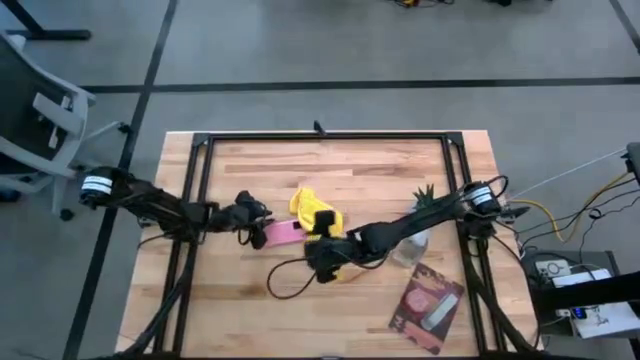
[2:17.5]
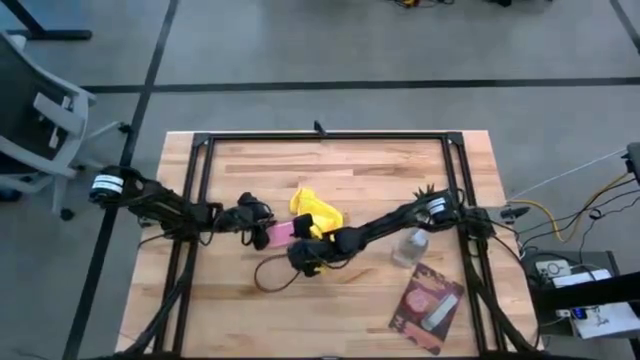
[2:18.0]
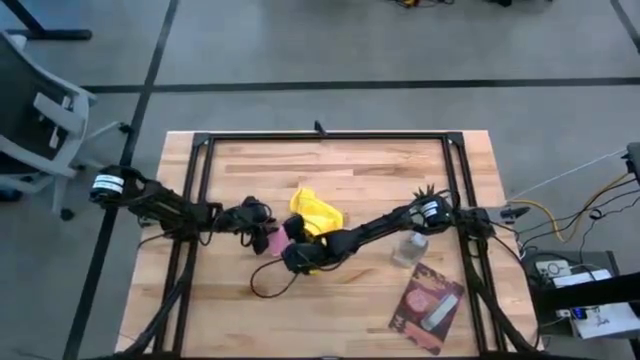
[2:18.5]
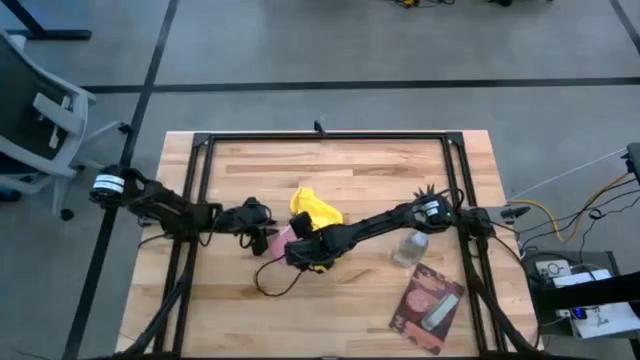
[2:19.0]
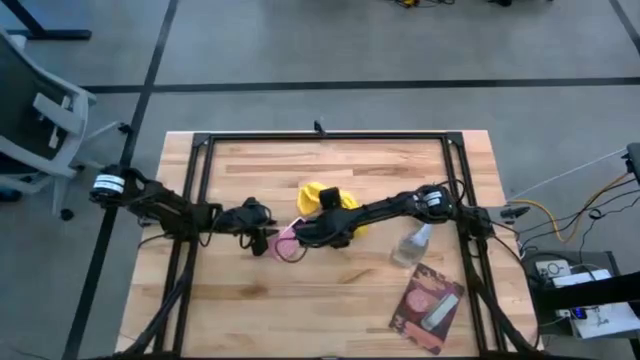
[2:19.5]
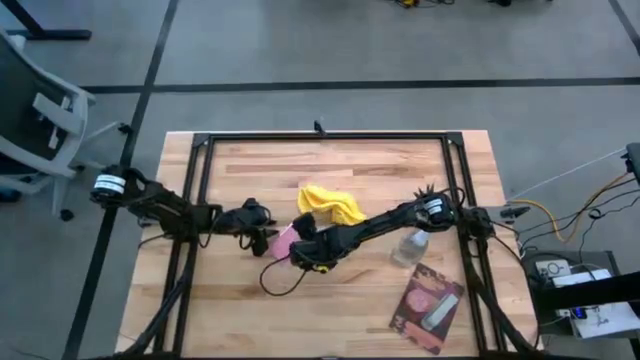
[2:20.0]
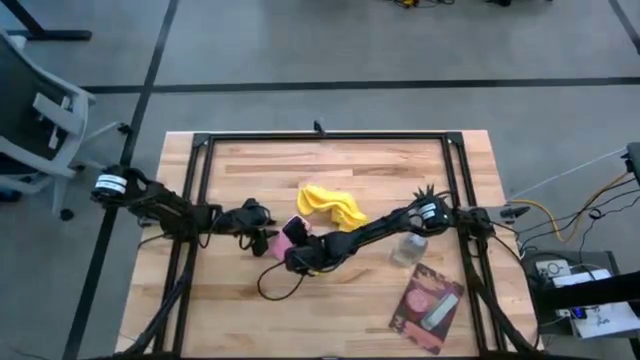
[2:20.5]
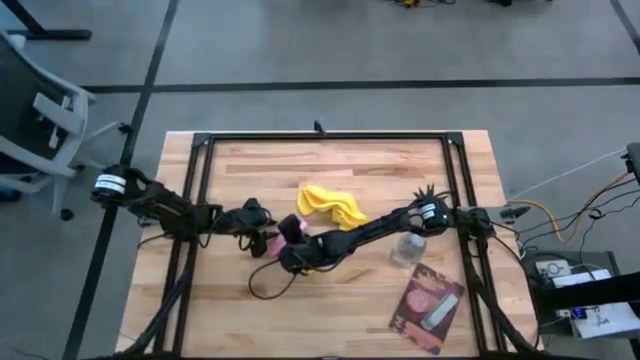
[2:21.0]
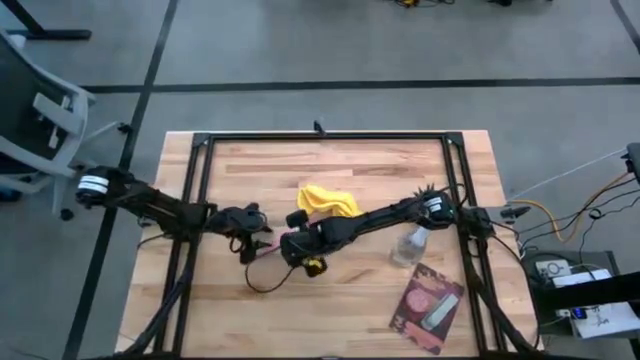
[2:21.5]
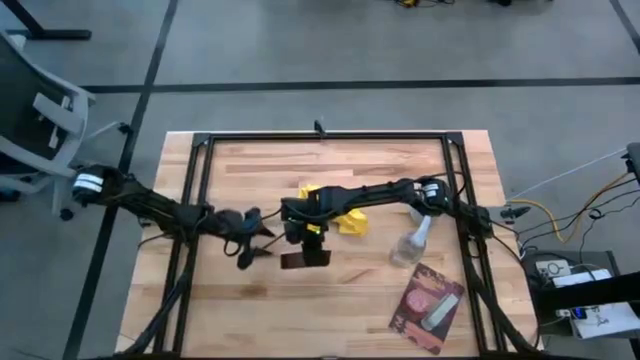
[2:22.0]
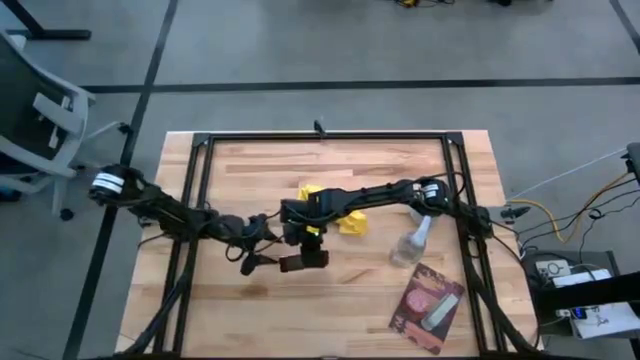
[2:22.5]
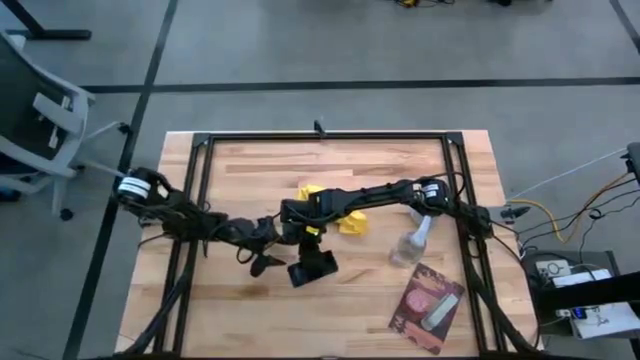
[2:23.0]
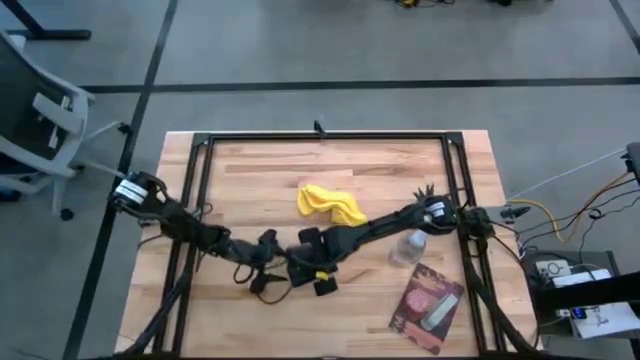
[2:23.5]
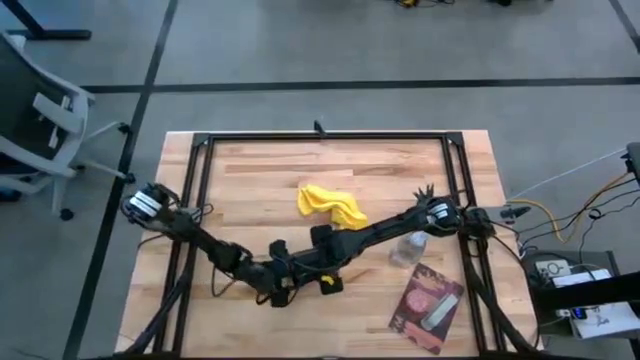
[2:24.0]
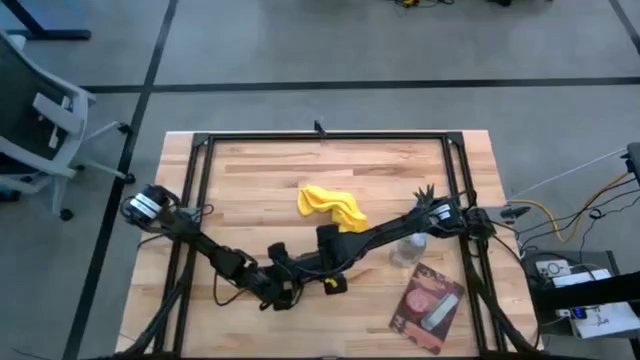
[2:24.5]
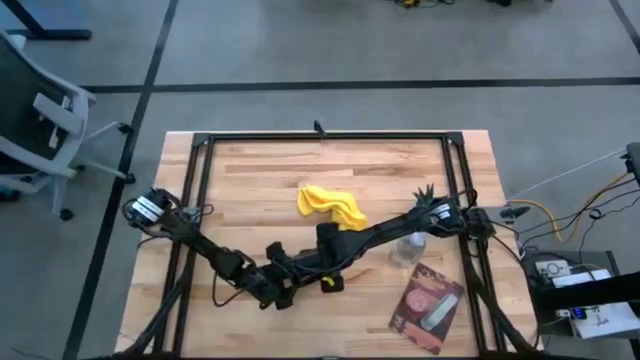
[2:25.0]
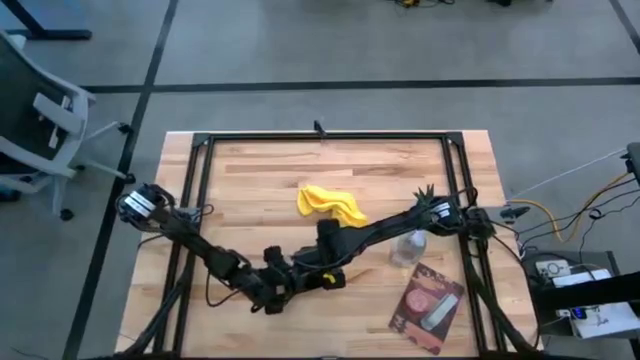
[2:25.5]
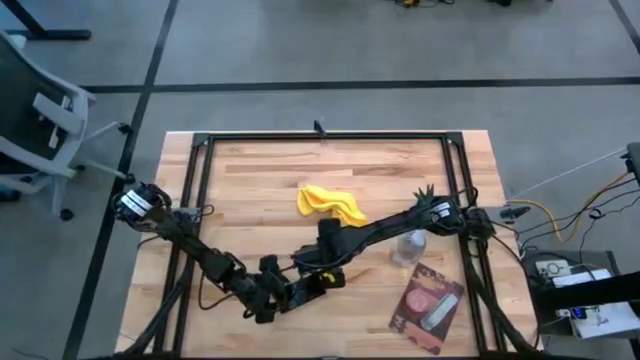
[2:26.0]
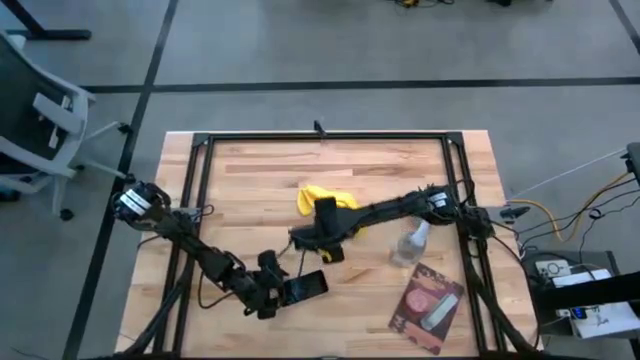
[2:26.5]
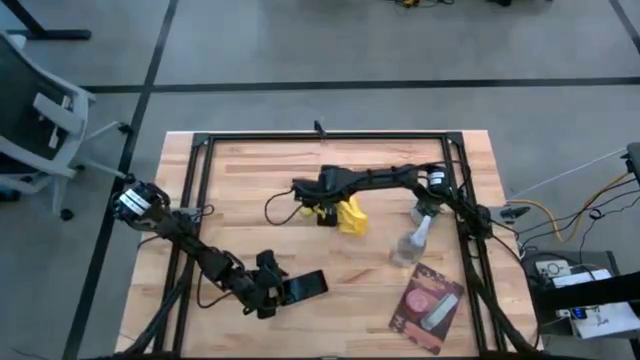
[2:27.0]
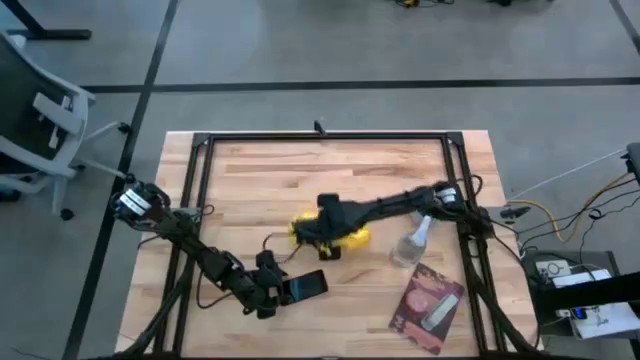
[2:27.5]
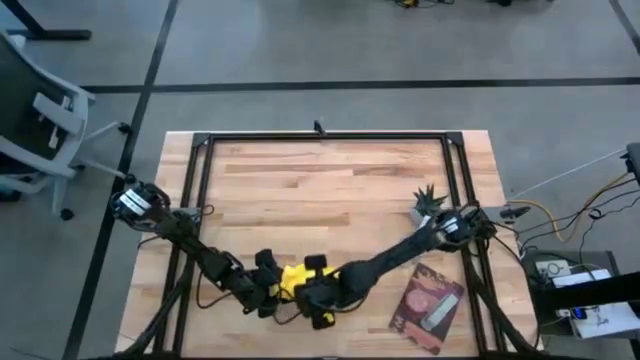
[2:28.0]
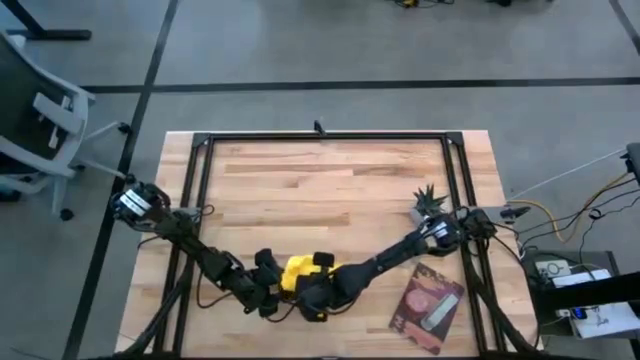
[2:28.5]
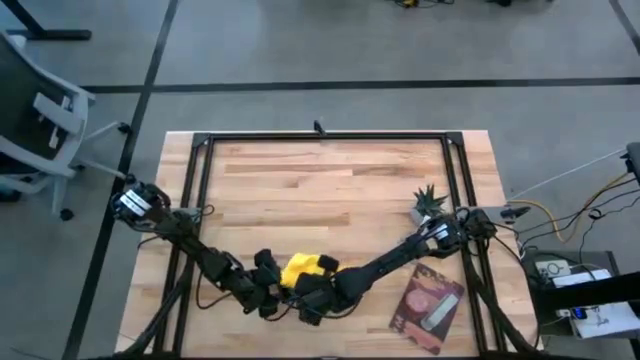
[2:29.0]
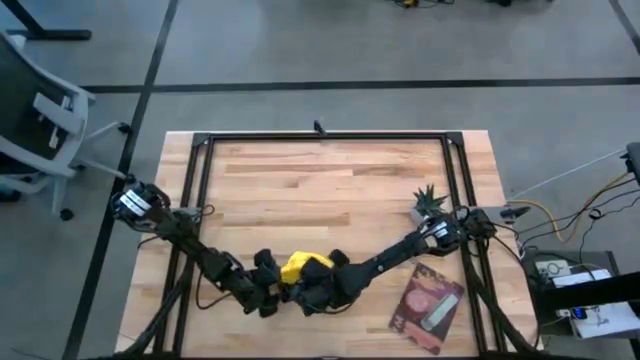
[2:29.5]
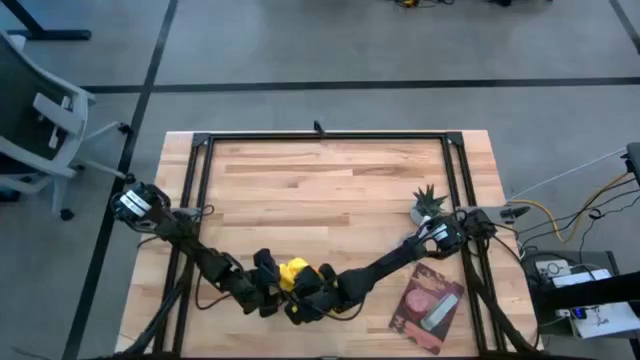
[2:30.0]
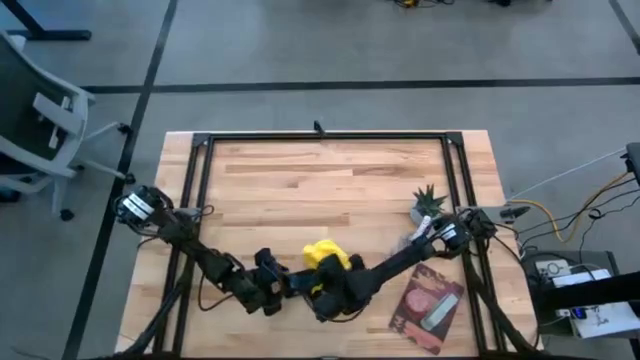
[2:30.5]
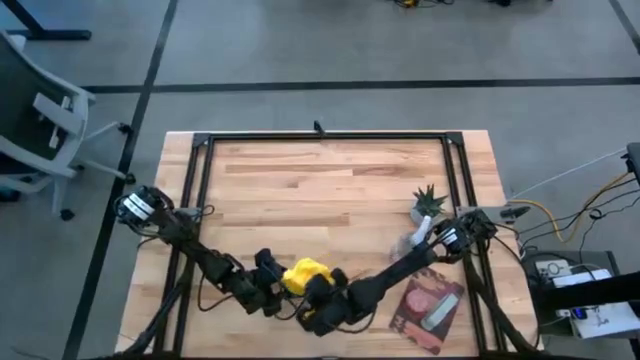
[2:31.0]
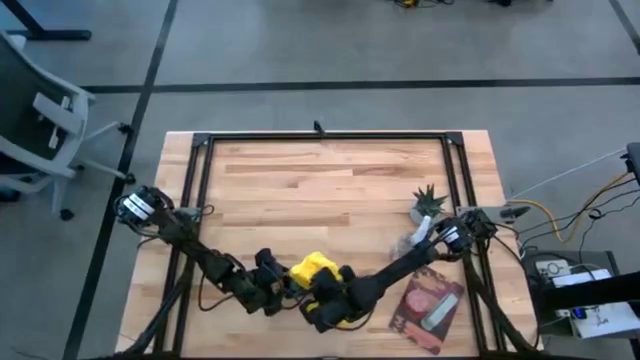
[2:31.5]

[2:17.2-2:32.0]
Task: Apply microfiber cloth
Wipe the front of the pink cellphone with a microfiber cloth

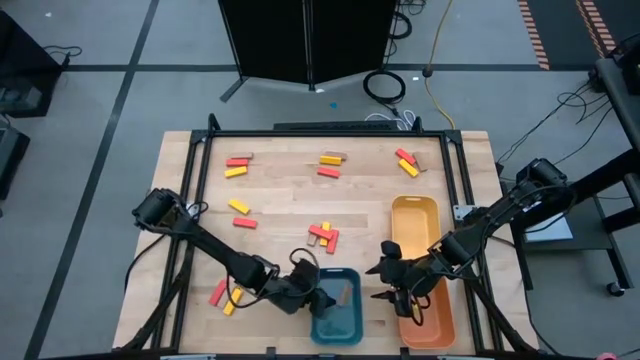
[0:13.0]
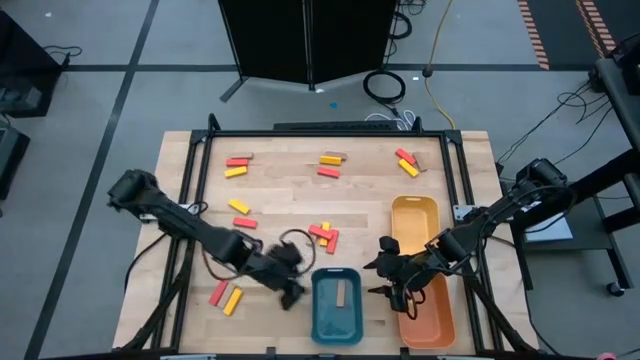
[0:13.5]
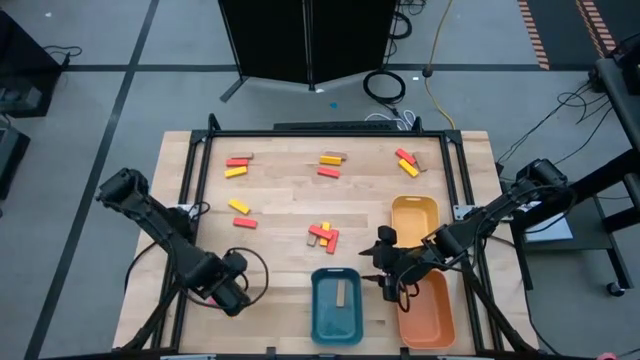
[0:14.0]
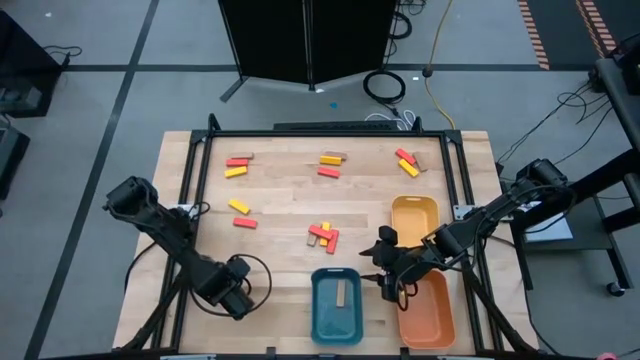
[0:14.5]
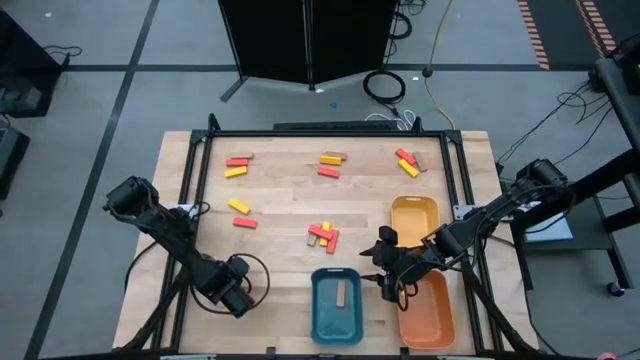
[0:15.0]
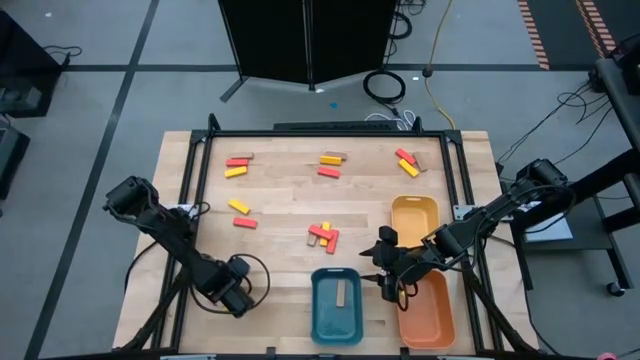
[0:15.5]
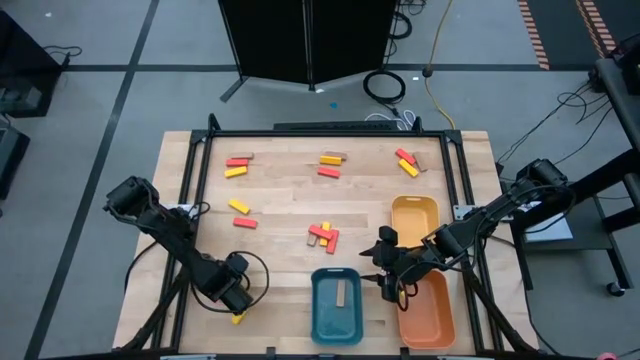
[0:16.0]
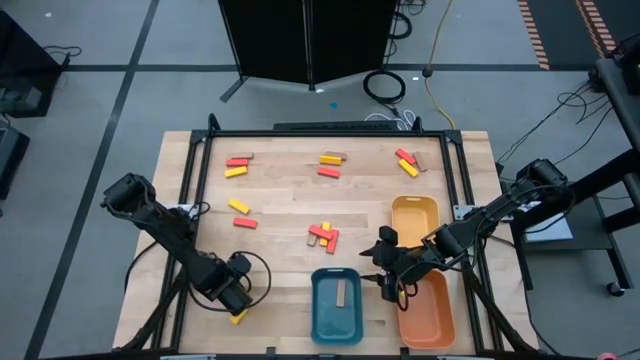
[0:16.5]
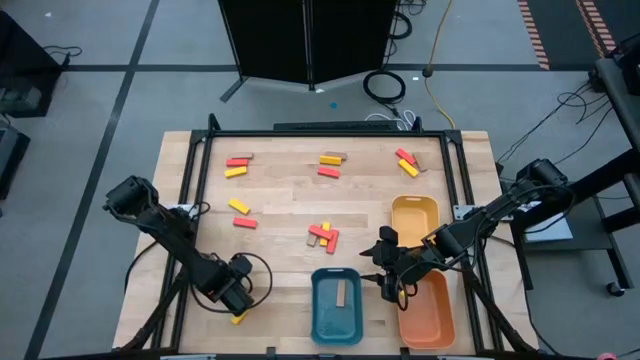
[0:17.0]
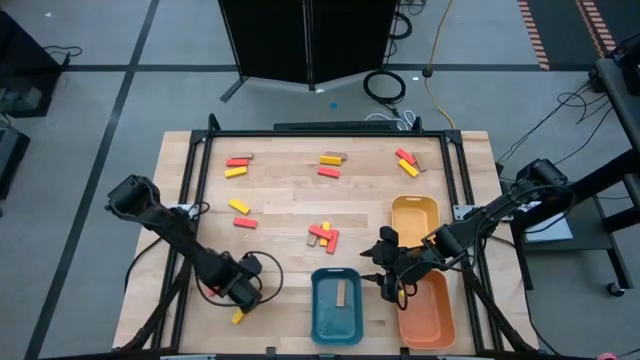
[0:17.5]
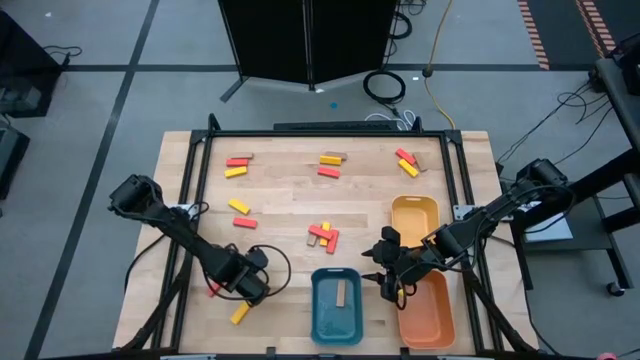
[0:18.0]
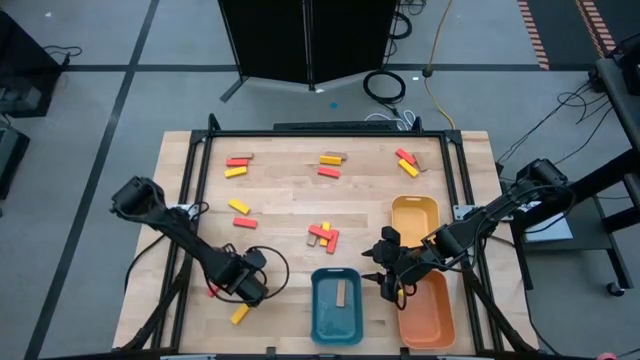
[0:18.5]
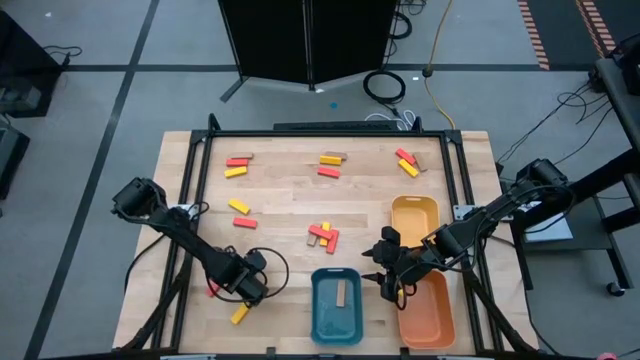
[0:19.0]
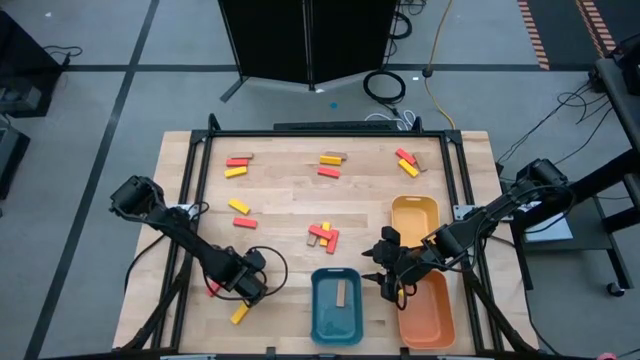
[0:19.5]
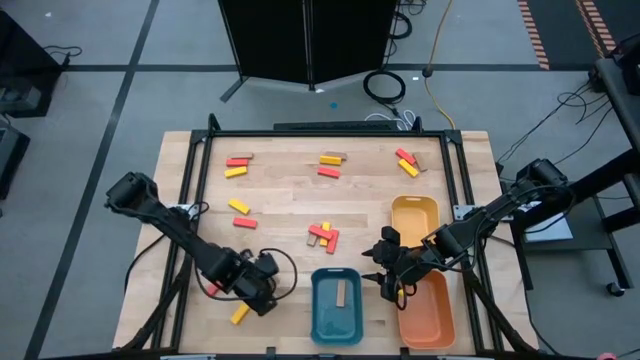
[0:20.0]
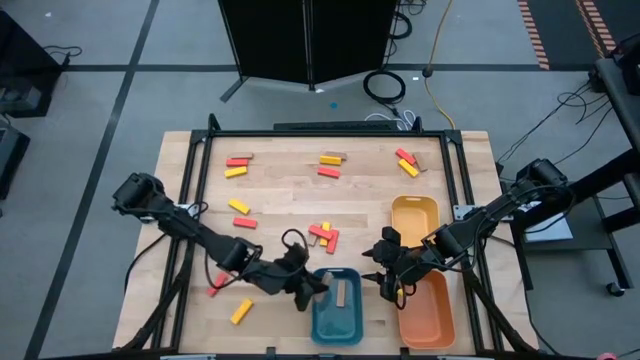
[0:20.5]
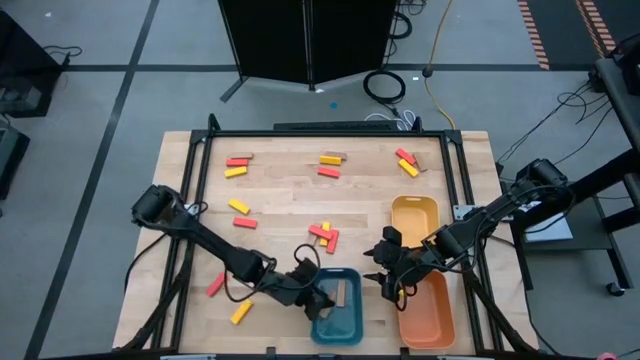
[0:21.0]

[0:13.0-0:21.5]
Task: Sort blocks
Put the brown block into the blue bin
